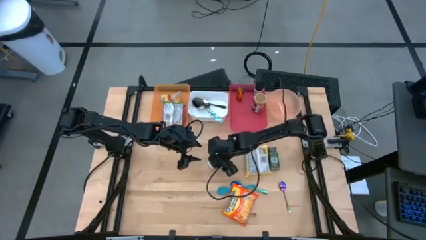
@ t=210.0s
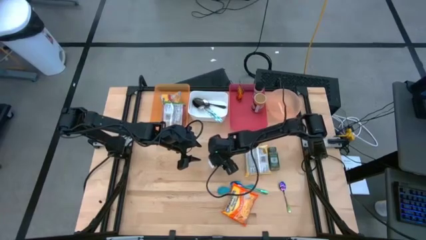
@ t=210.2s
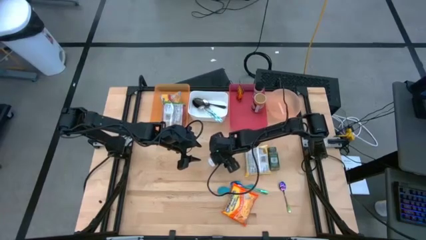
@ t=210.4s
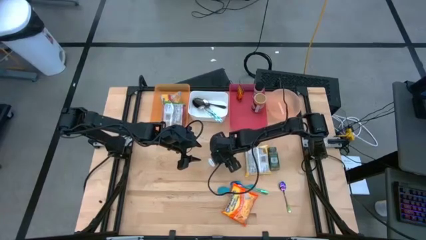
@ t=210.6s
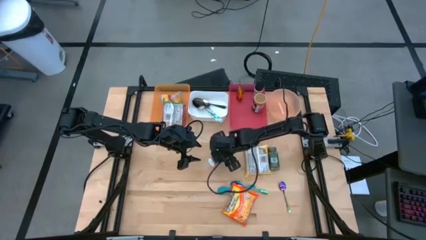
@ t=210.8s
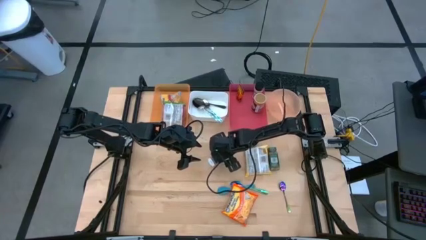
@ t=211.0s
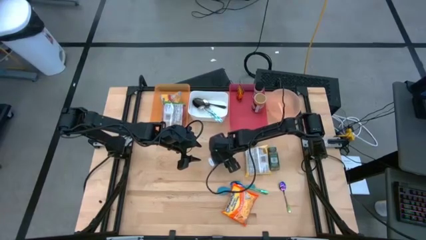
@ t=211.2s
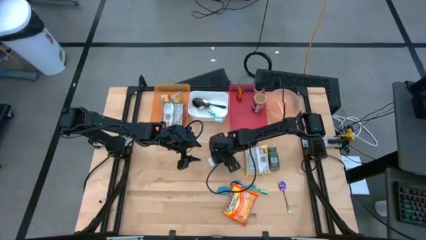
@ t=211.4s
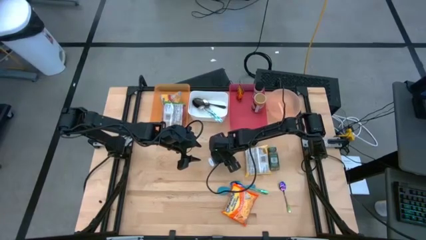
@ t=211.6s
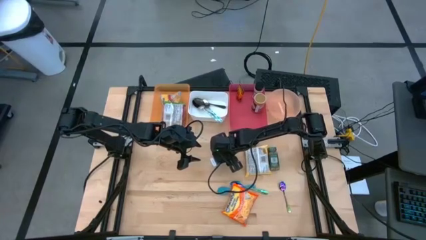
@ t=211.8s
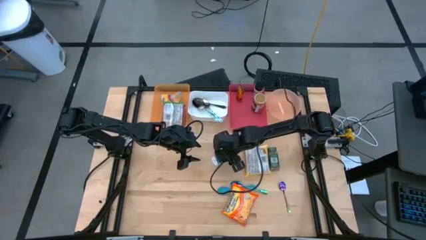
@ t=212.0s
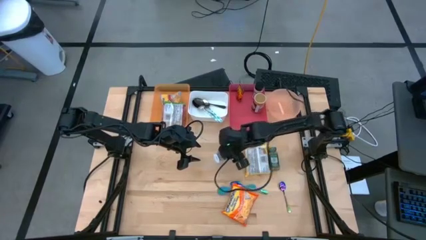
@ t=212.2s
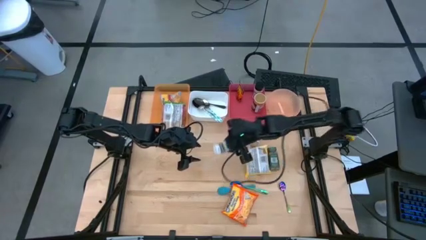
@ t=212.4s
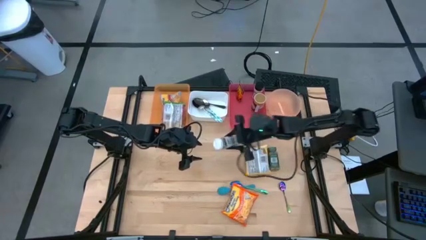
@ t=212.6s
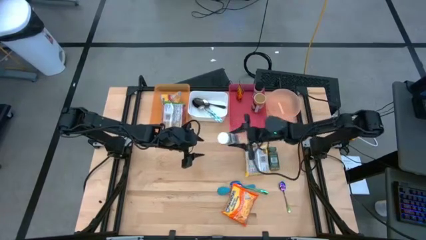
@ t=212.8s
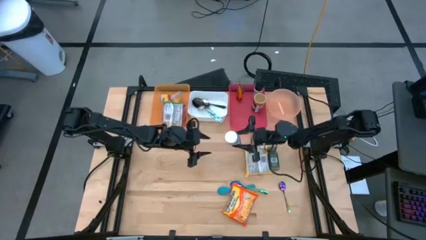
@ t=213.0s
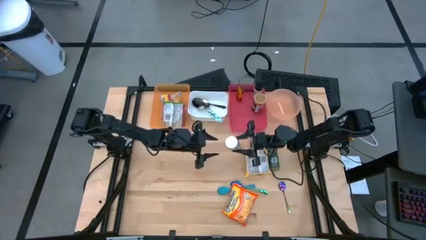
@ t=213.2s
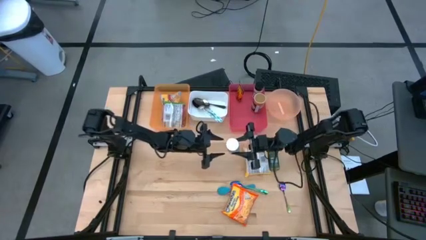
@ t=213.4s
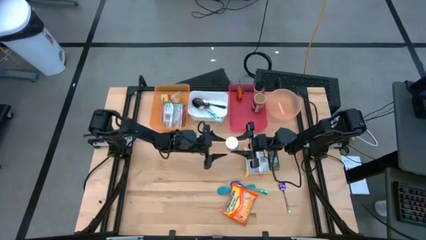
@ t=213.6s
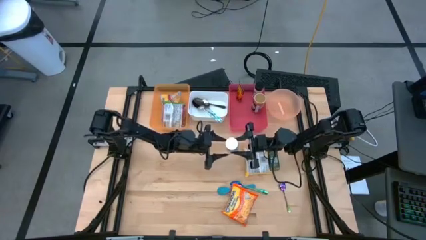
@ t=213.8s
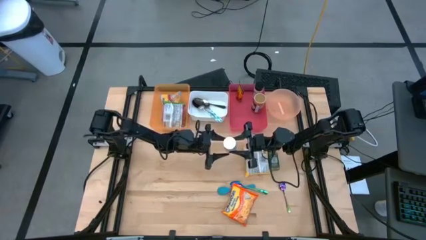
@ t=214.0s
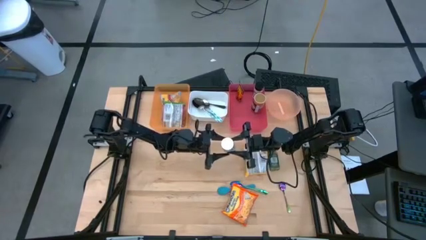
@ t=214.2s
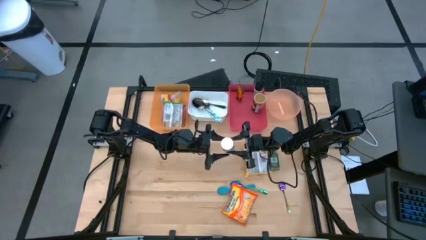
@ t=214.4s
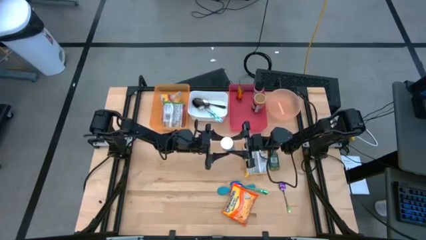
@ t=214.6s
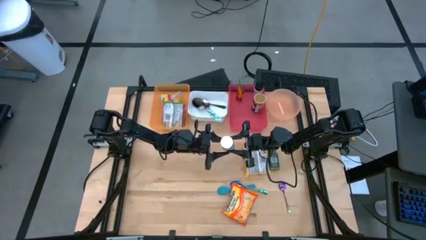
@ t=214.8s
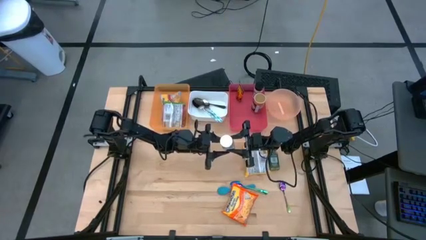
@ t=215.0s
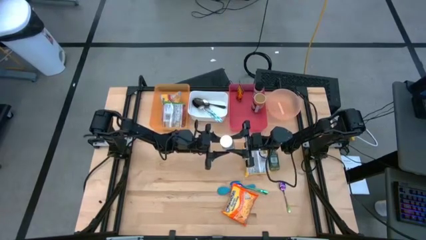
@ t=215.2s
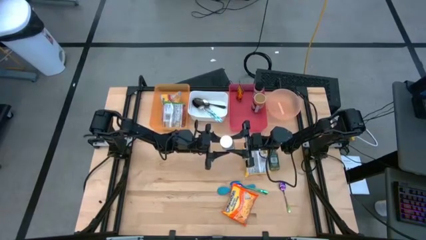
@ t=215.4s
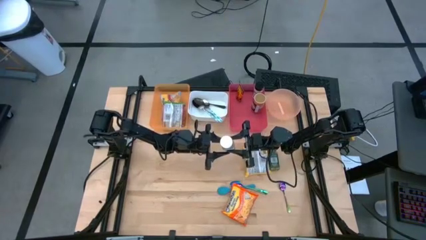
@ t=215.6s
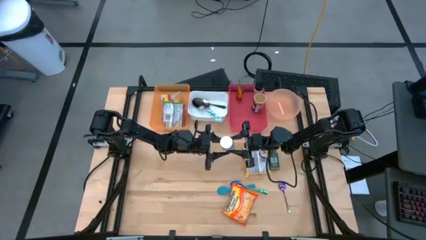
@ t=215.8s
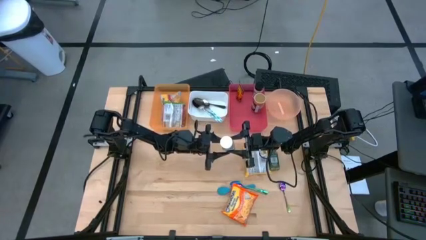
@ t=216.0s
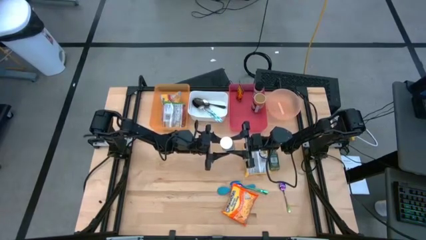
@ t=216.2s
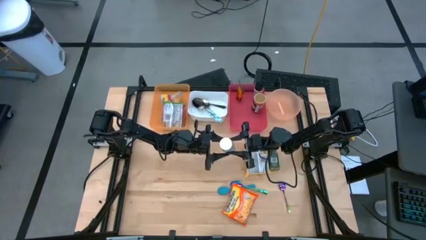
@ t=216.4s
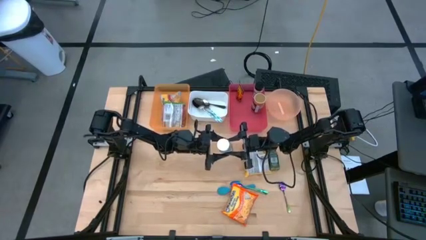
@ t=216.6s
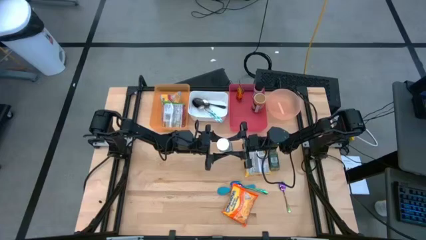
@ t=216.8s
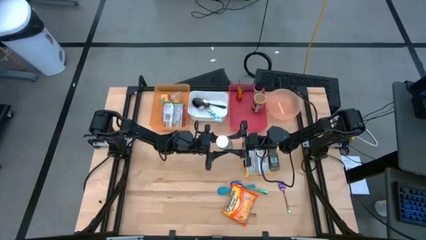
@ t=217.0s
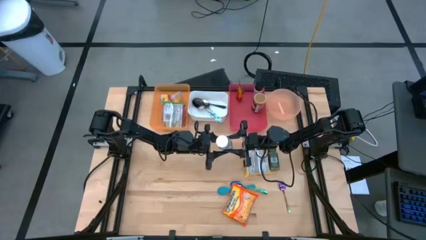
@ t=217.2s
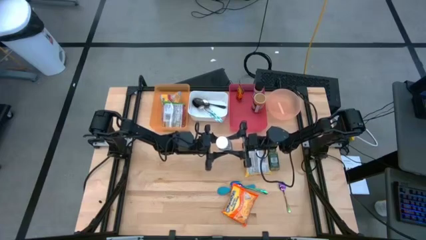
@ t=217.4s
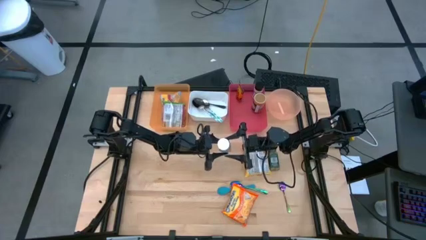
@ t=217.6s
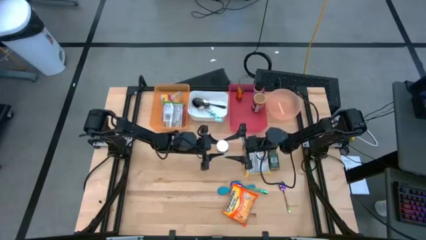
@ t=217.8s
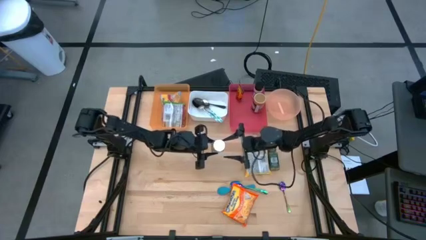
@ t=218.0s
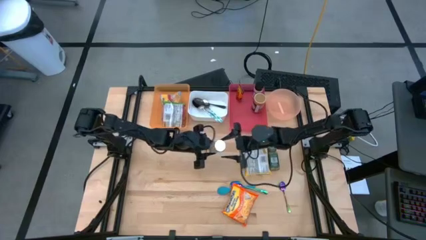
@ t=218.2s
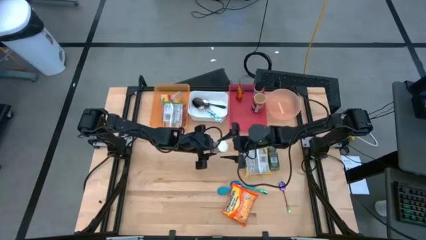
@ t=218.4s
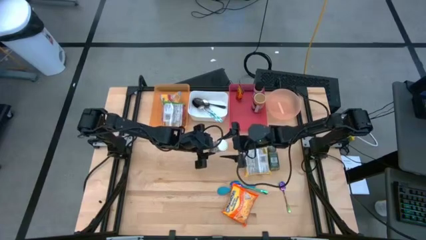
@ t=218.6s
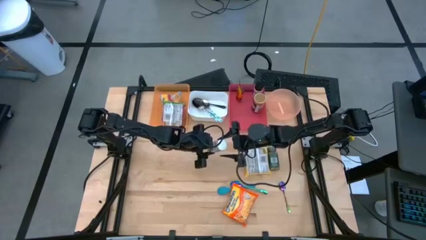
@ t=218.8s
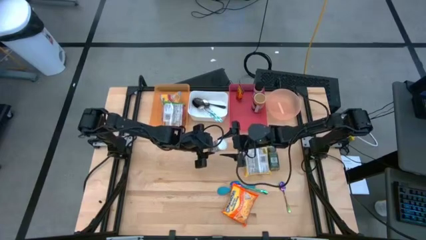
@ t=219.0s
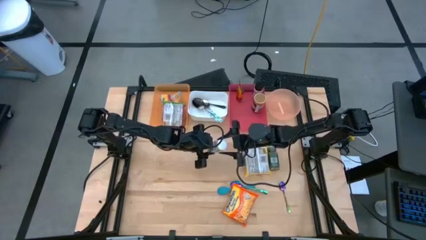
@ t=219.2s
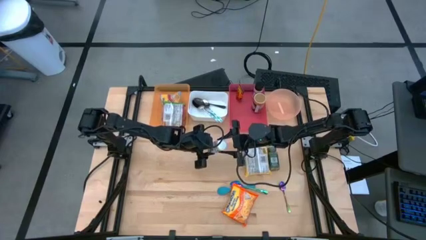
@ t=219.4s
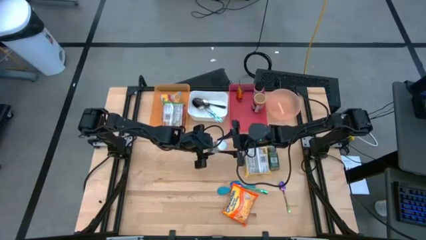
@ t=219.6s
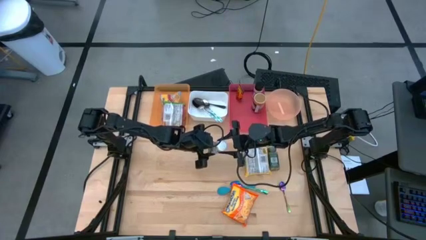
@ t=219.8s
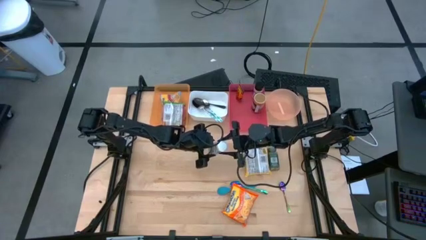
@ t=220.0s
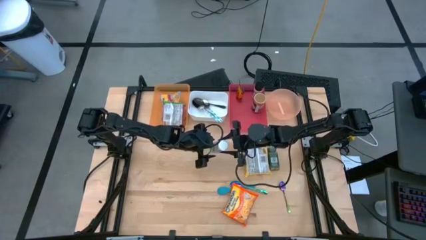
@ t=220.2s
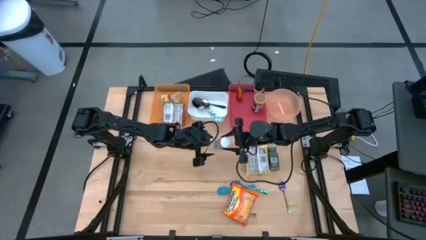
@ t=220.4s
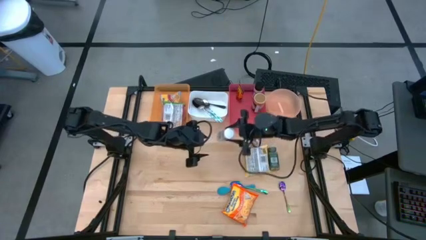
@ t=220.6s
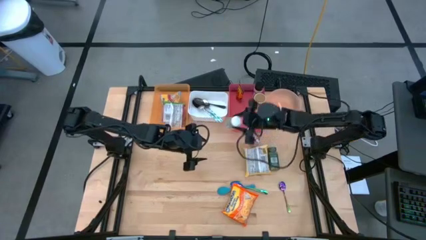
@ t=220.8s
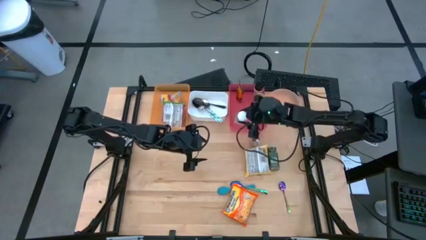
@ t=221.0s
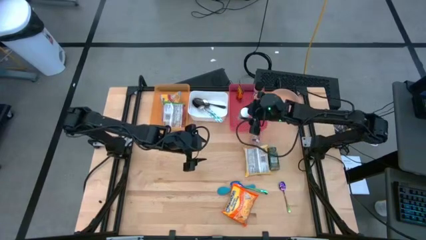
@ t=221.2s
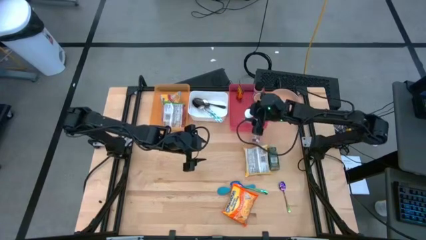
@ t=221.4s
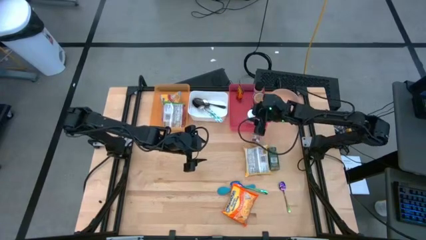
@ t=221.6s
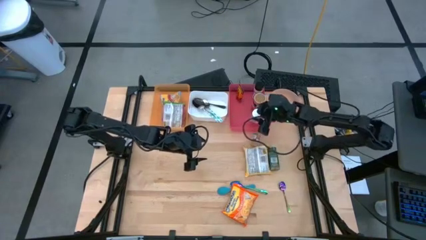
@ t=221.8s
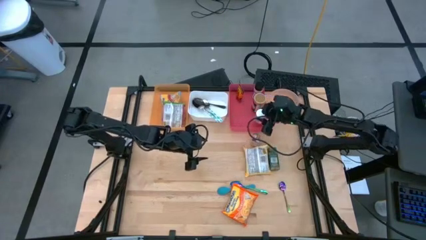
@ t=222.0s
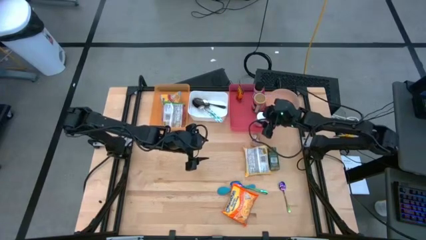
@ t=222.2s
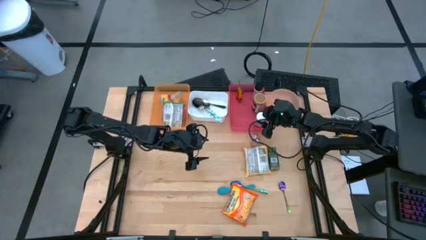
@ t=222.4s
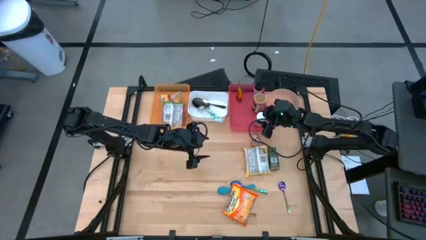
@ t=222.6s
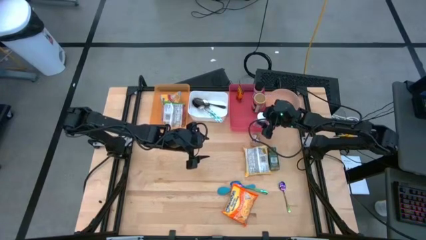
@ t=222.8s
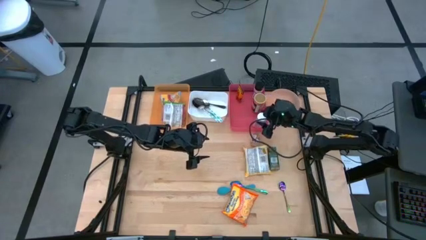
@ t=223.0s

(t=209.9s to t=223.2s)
Task: Pick & Place Food Item
Put the white seasoning bottle into the red bin
